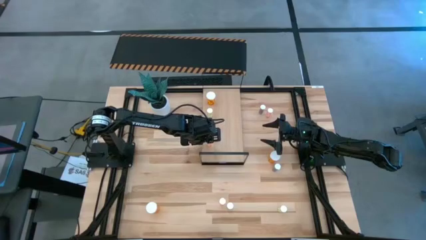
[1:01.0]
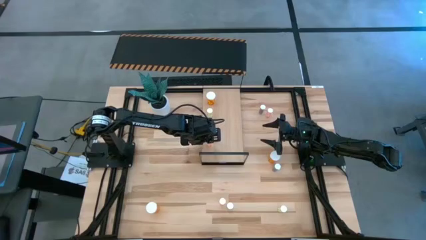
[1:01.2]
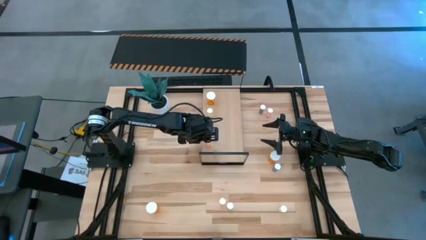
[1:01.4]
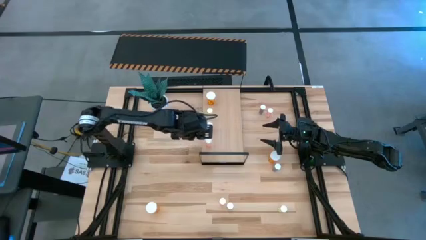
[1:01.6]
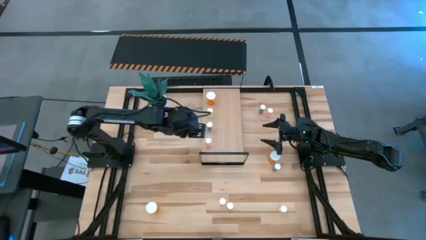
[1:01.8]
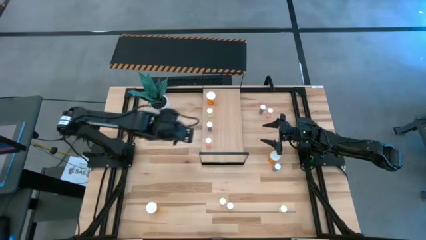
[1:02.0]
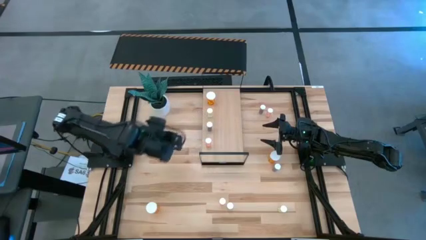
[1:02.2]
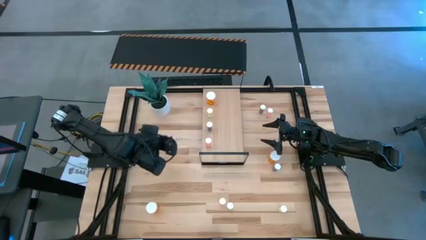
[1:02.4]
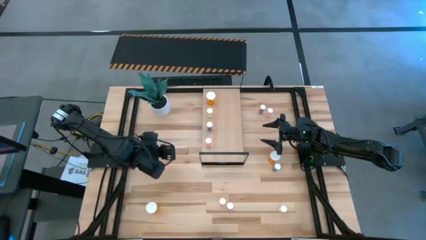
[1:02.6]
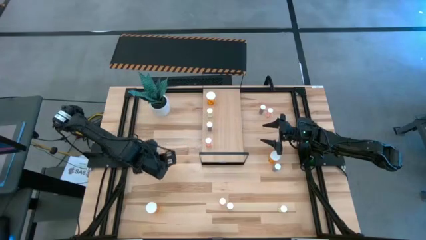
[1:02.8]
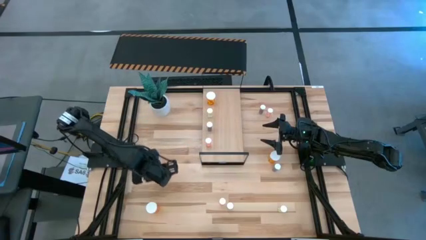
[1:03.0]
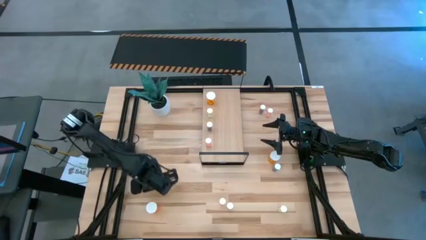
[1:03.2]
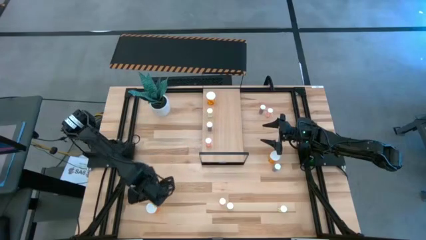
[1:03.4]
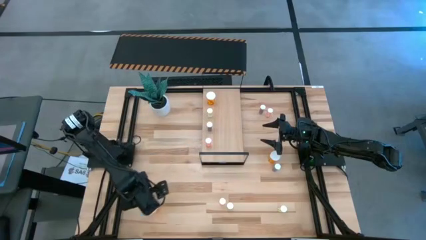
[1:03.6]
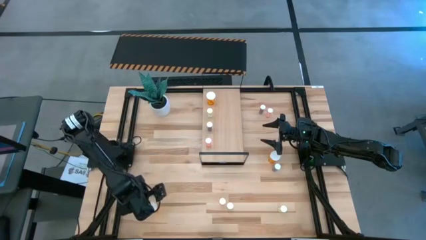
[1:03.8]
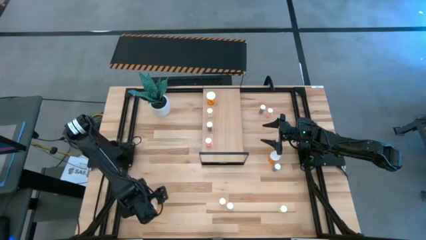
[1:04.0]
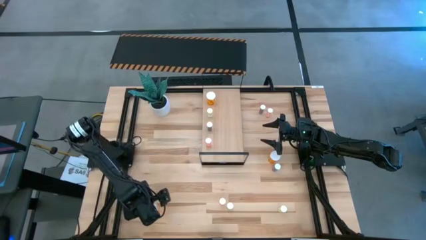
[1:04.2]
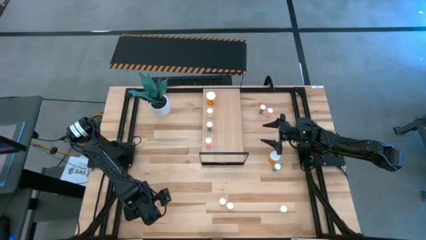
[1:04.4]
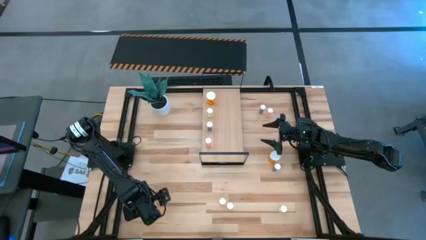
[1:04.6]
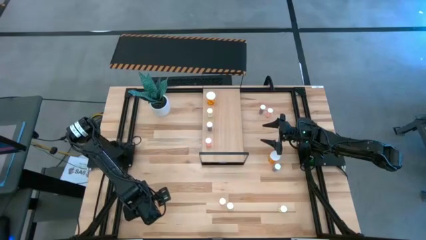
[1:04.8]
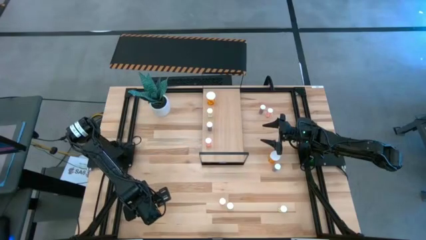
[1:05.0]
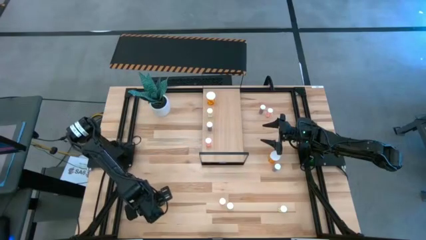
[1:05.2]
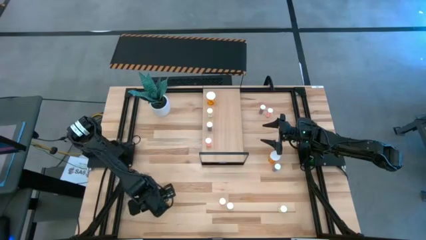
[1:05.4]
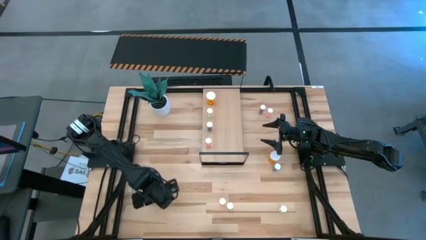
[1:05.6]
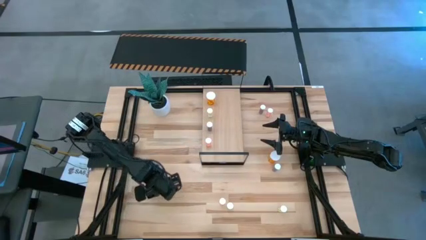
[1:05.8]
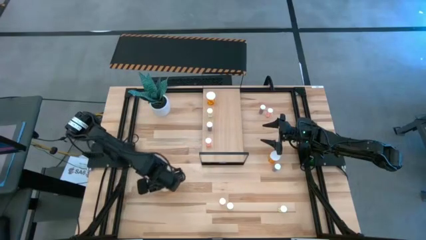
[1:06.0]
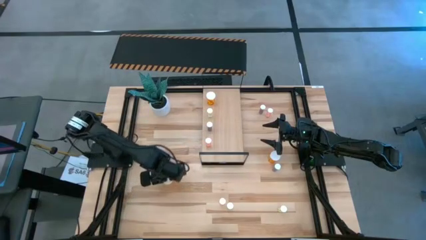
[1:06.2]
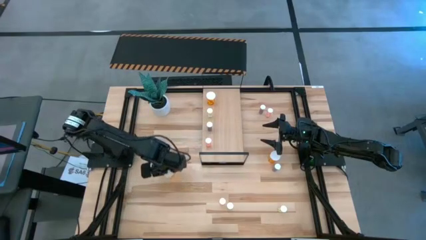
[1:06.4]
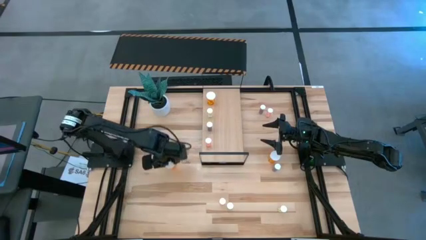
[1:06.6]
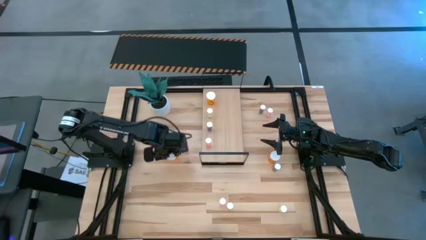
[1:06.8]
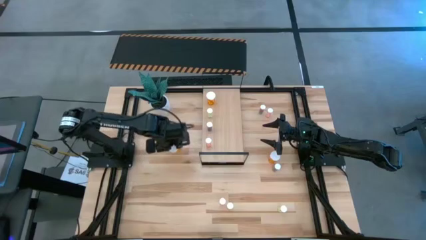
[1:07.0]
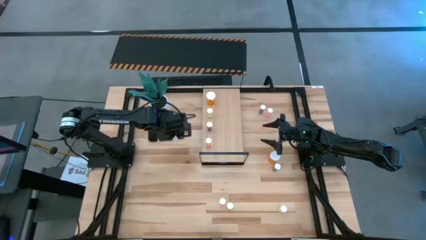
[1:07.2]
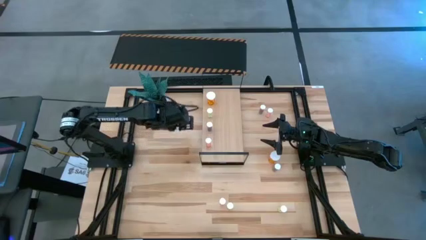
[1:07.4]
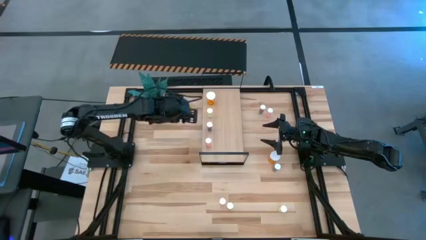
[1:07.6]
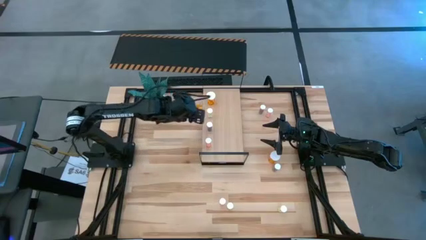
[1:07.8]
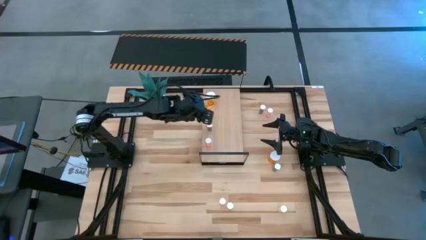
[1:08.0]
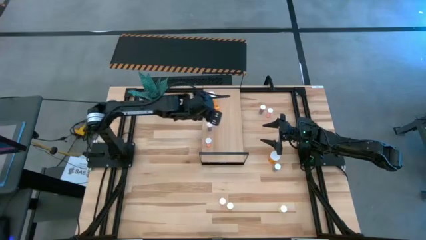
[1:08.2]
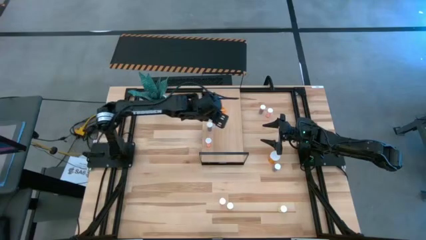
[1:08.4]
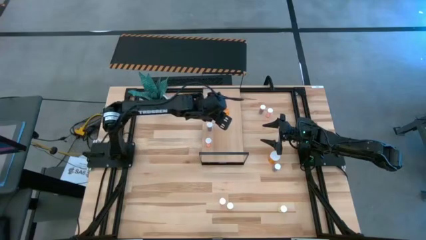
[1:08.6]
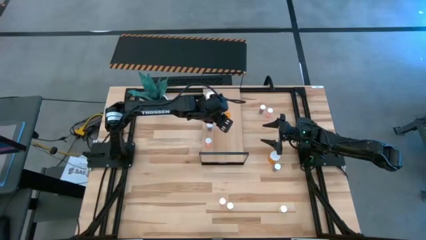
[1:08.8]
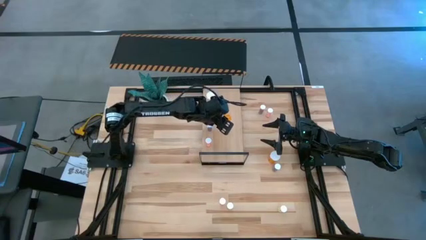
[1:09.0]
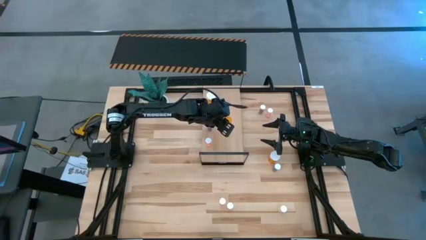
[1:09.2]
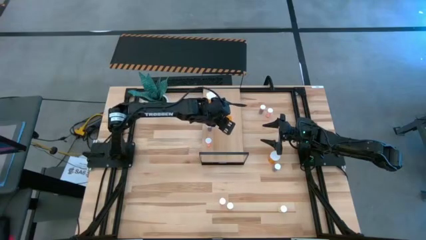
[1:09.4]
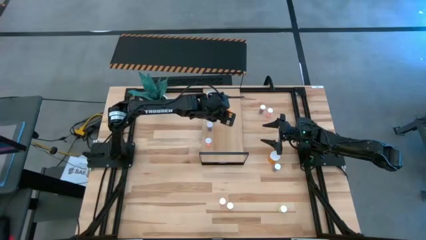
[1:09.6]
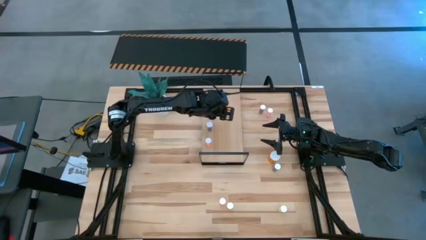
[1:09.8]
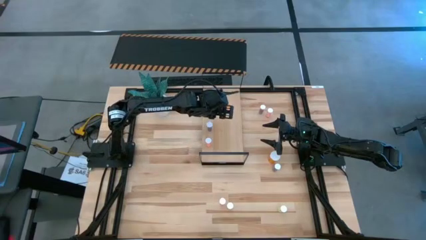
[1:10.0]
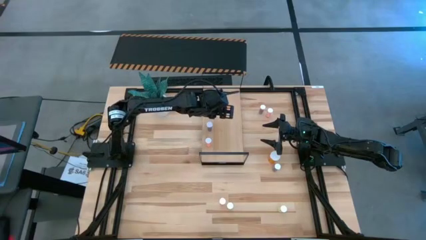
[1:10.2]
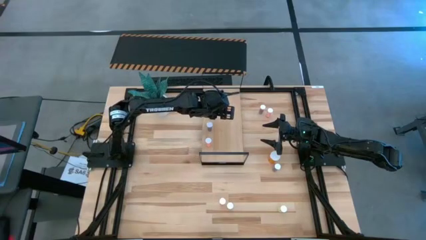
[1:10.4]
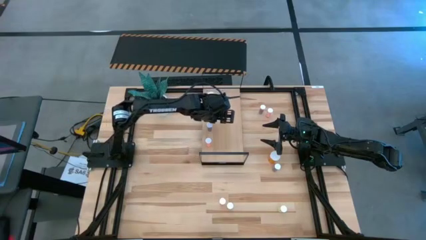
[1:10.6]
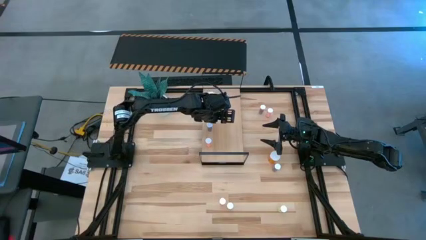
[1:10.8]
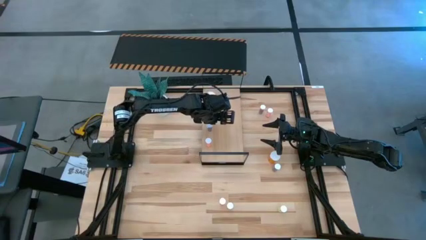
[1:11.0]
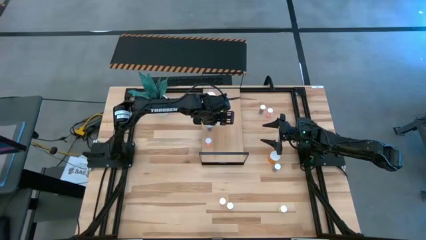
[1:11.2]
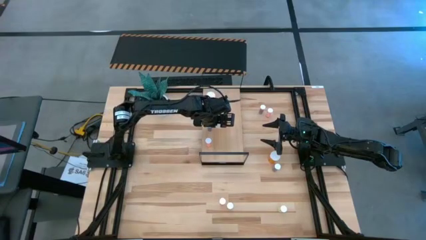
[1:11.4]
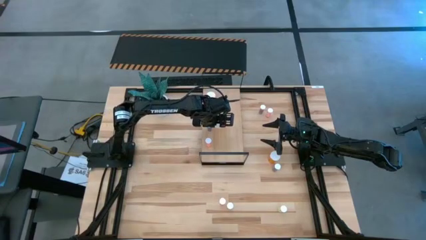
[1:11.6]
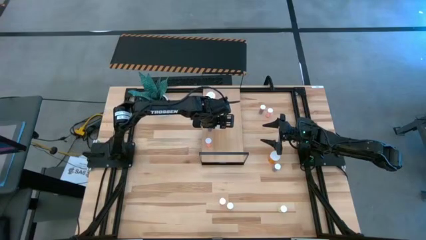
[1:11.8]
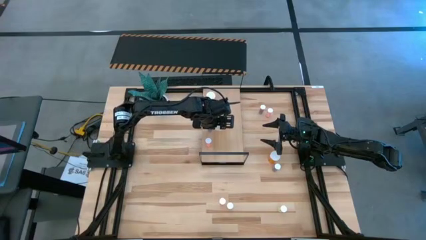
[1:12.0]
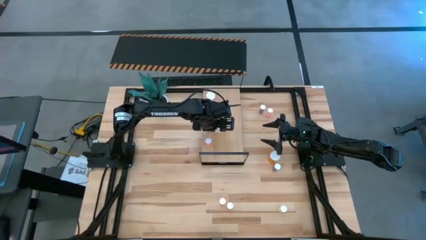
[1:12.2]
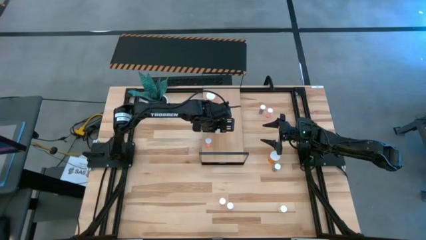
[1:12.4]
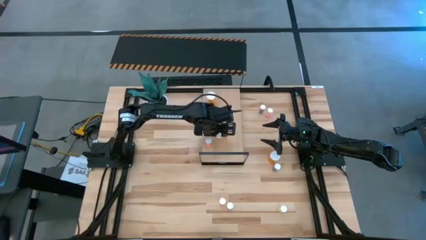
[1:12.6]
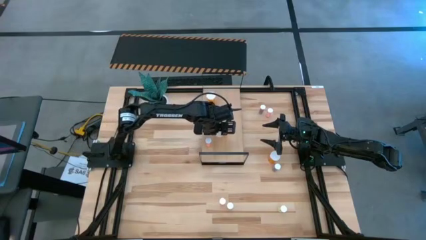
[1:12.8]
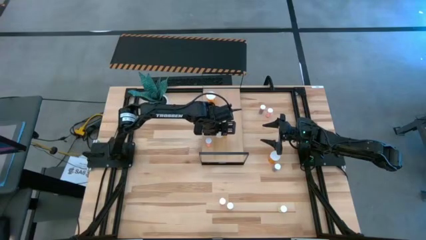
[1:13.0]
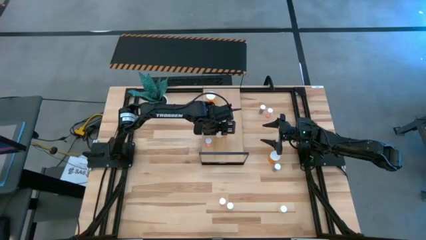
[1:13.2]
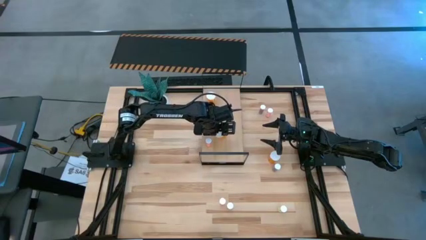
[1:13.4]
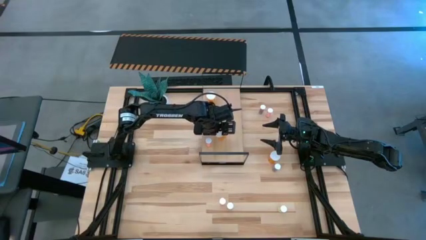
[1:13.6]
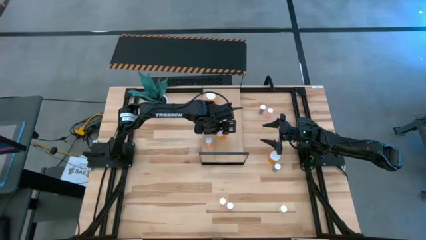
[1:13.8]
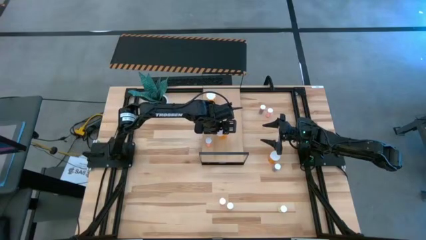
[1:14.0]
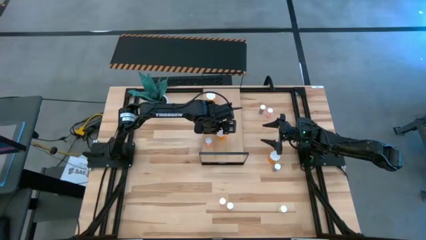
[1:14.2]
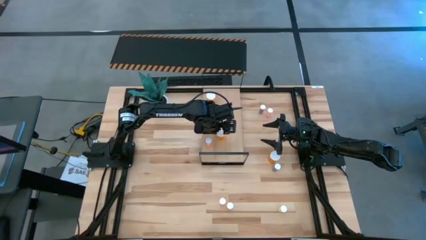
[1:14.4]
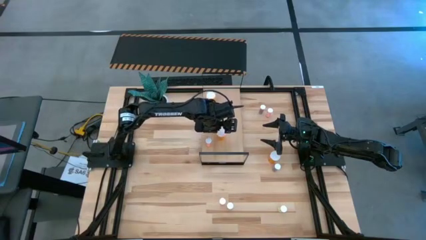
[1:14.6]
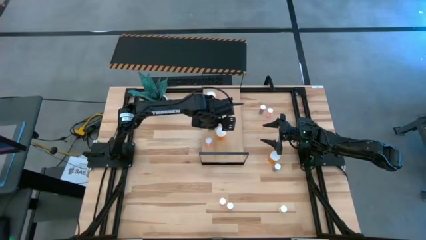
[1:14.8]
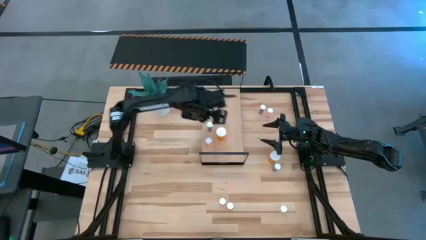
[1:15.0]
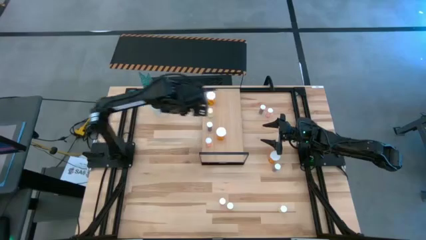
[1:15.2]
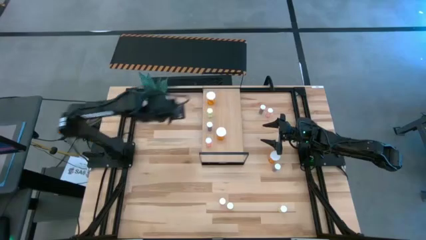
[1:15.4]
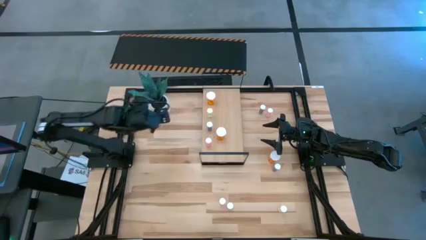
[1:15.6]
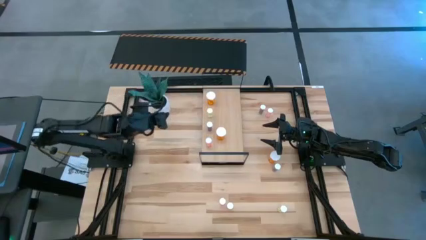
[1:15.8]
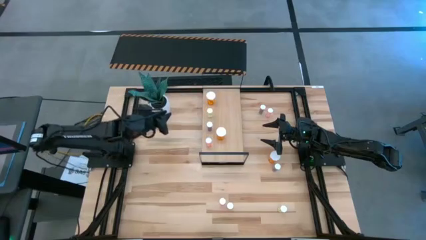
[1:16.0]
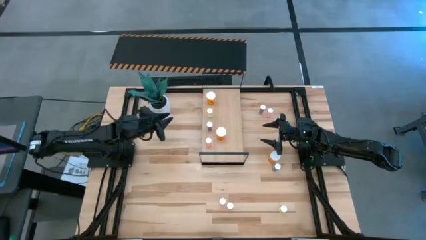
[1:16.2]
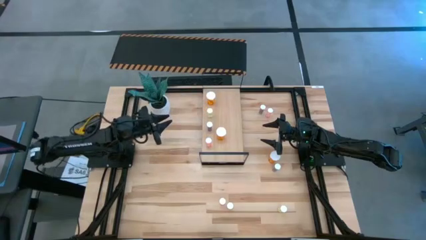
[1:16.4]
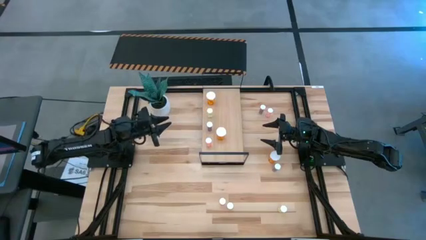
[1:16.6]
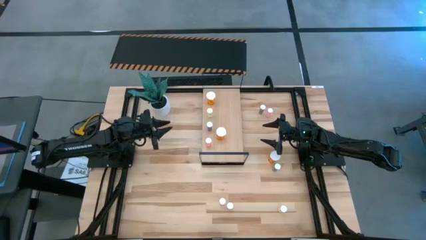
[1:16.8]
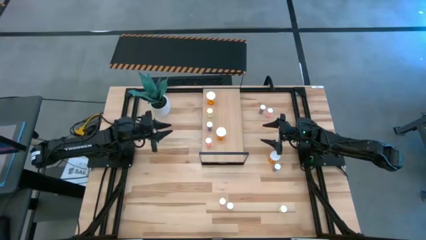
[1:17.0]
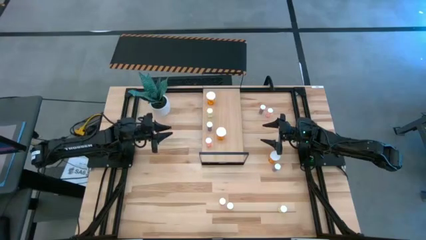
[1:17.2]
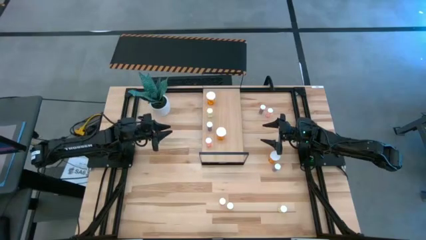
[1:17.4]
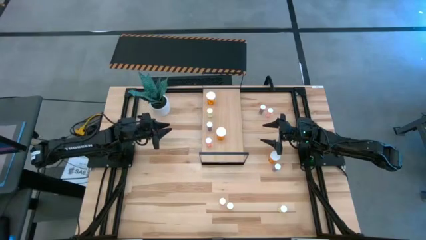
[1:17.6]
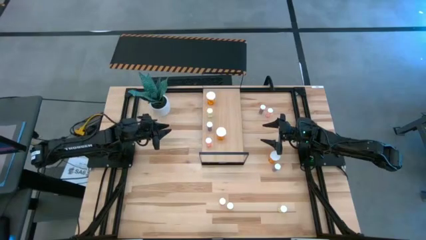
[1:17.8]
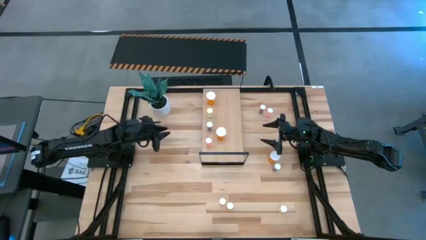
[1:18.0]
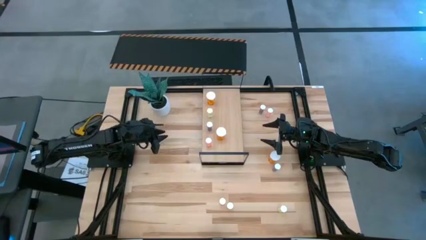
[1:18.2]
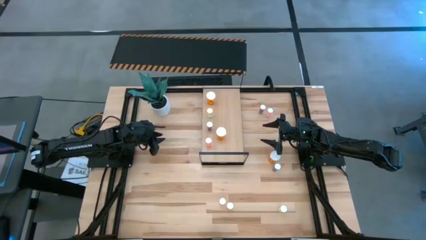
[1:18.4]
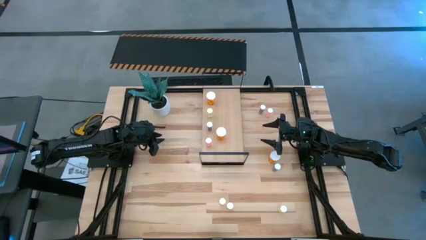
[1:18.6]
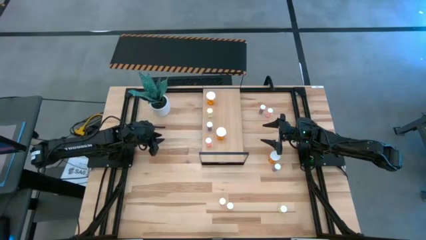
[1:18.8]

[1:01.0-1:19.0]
Task: Pick and place medicine bottles onto shelf by color
Put the bottom large orange pill bottle on the shelf aligned with the other large orange pill bottle
